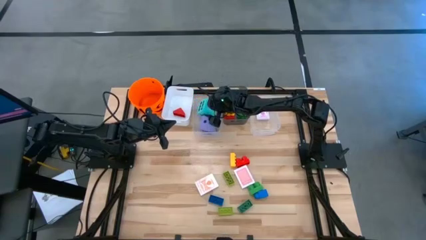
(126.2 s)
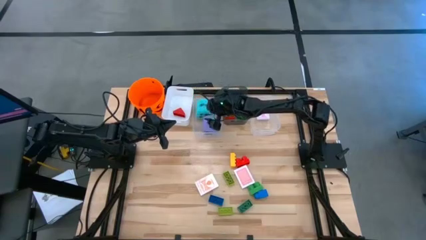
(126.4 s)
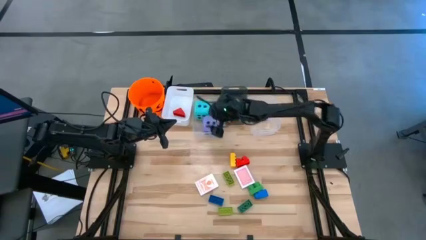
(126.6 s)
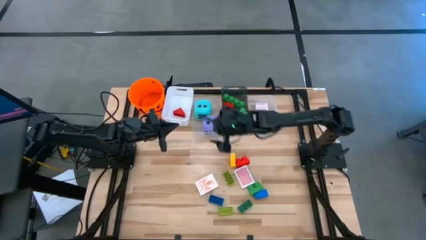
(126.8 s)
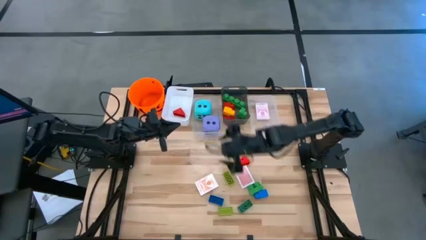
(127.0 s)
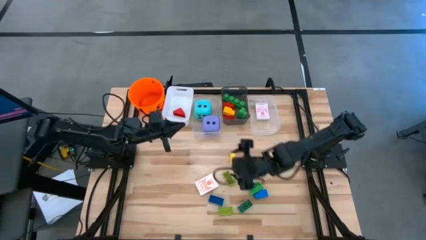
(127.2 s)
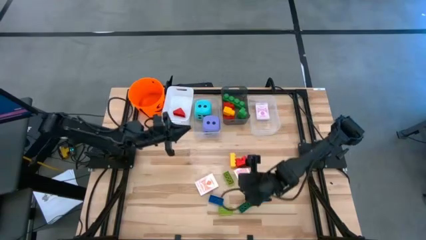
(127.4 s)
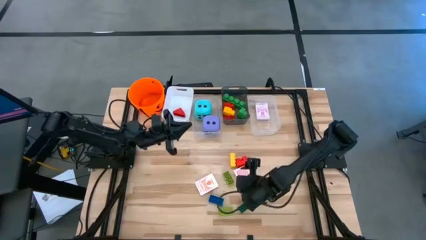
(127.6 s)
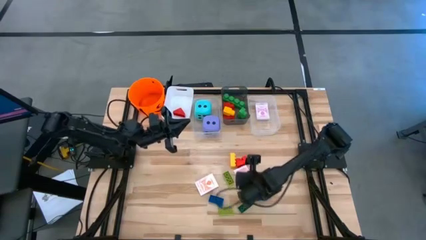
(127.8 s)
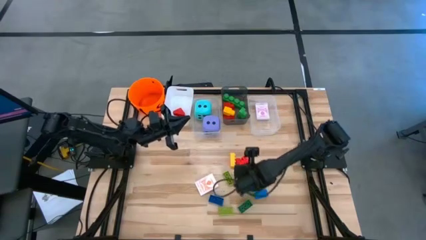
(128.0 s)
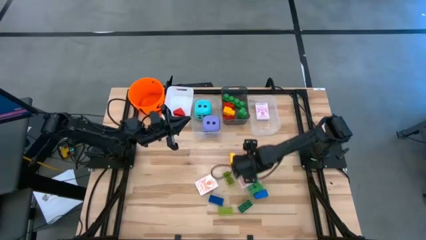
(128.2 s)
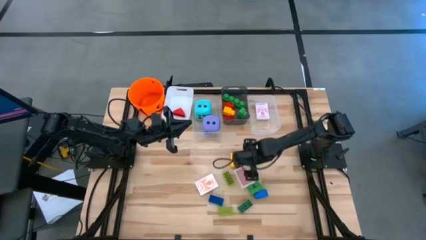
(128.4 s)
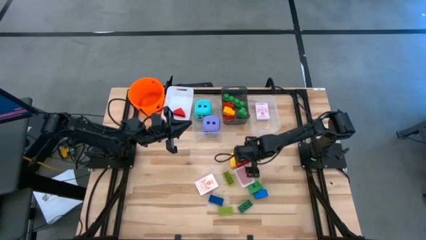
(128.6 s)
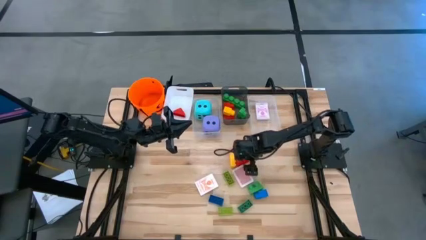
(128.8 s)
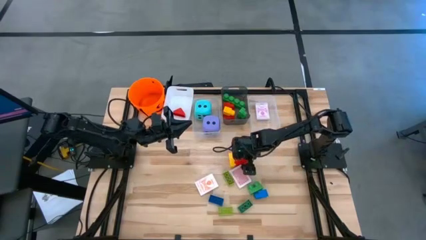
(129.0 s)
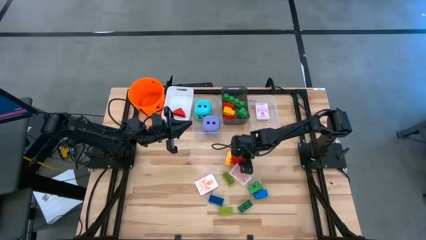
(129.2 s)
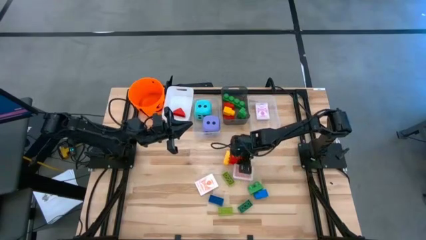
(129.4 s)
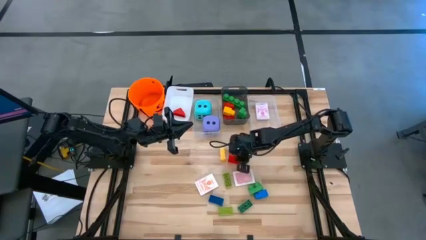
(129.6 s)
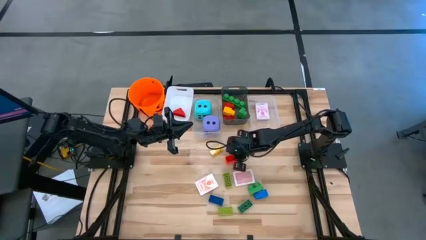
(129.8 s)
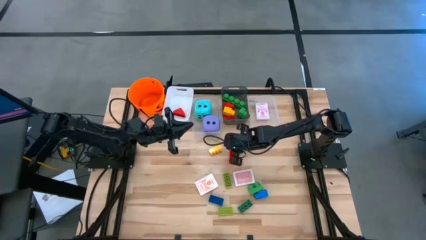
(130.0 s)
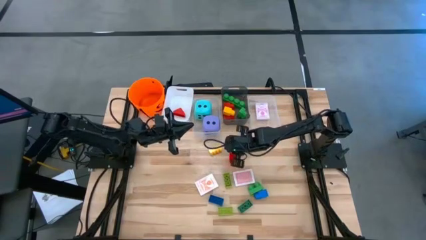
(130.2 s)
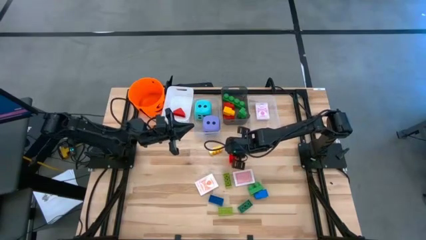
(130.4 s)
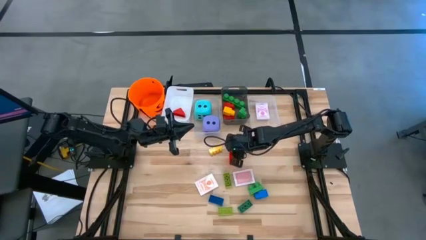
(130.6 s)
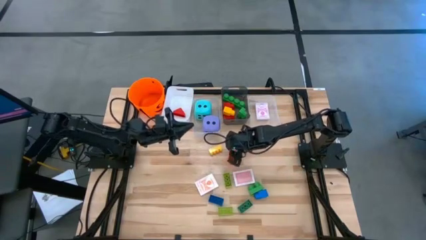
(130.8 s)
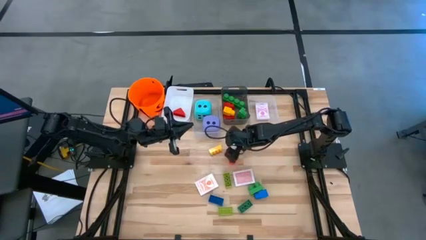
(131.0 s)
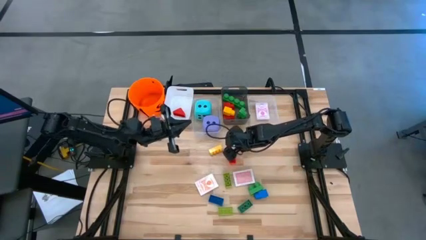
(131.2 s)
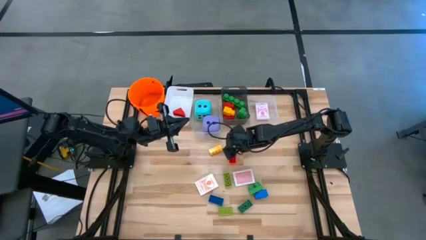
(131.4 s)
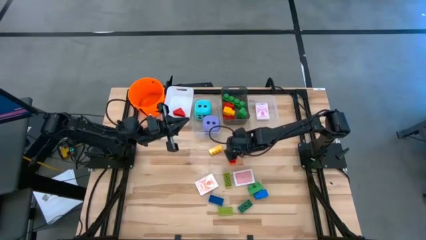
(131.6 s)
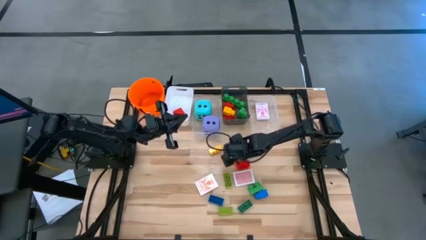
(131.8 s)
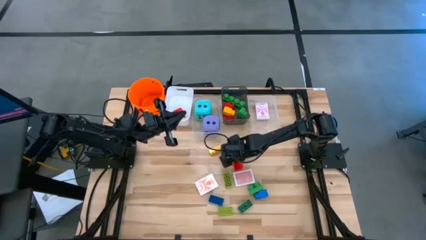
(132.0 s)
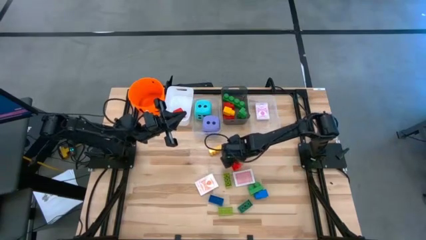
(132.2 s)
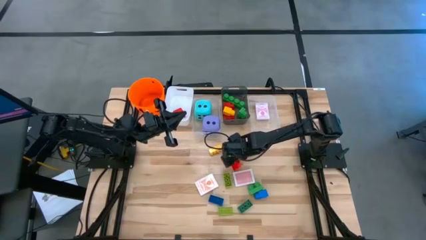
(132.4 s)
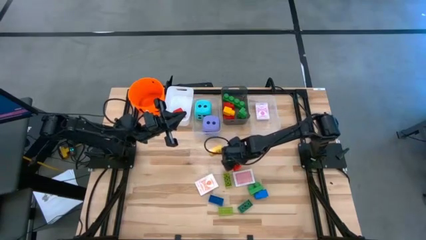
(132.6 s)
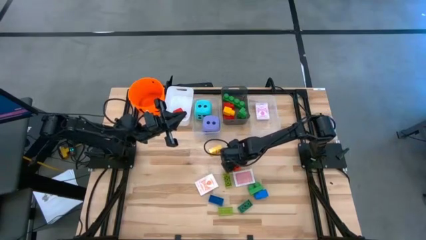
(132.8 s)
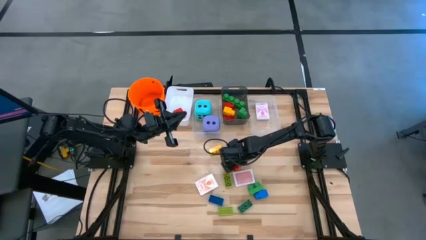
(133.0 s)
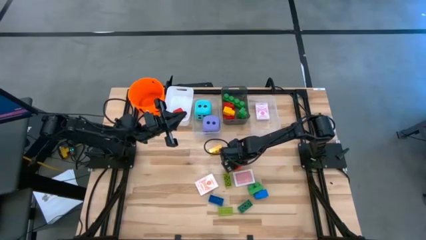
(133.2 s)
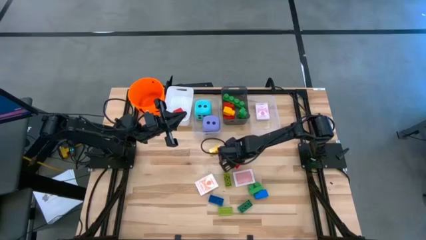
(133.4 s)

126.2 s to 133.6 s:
Task: Pick & Place Toys
Put the large red game piece into the black bin

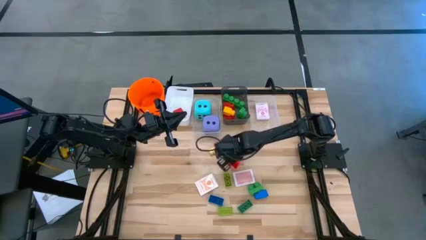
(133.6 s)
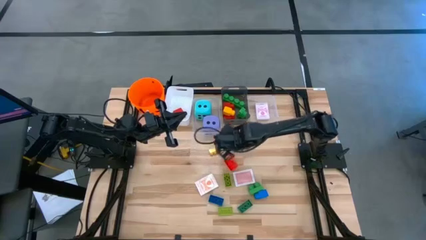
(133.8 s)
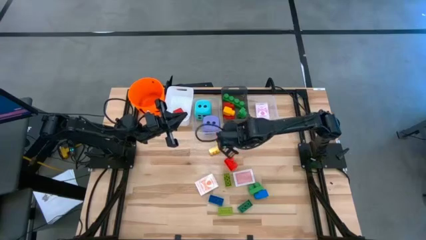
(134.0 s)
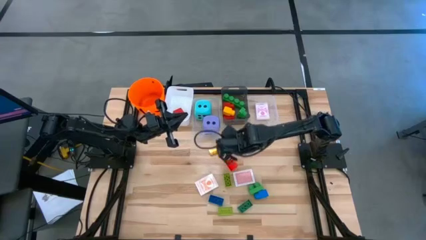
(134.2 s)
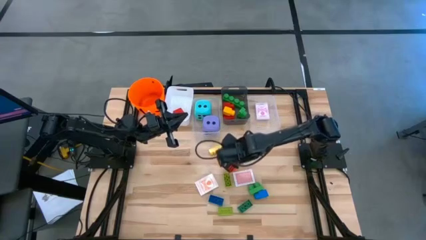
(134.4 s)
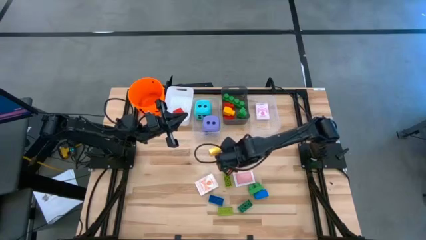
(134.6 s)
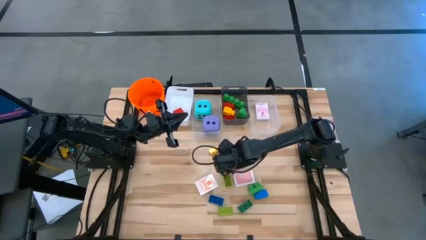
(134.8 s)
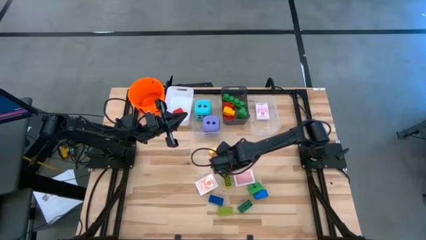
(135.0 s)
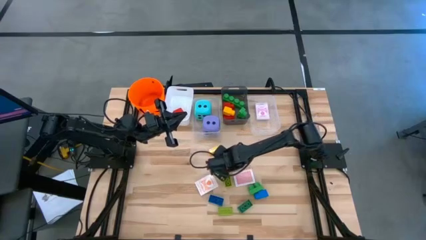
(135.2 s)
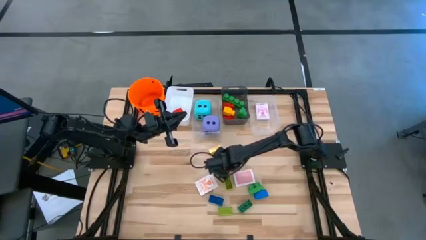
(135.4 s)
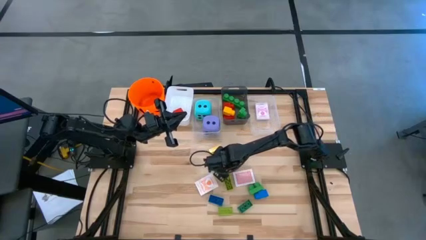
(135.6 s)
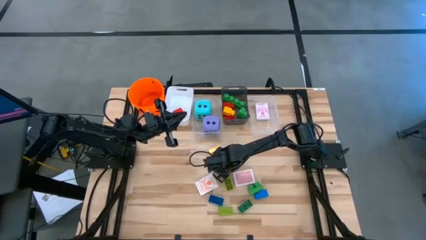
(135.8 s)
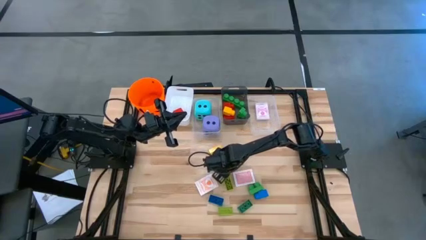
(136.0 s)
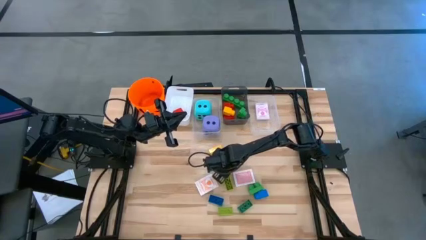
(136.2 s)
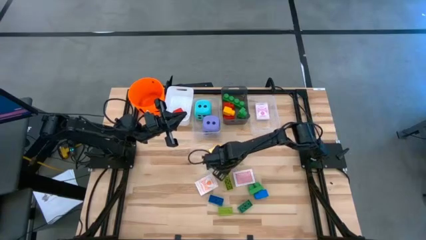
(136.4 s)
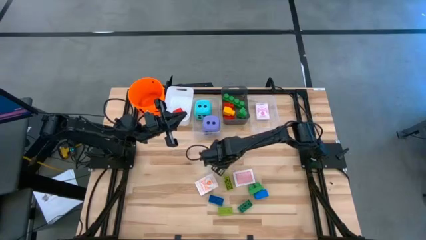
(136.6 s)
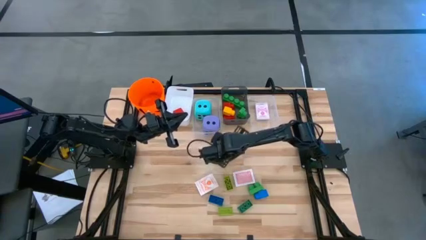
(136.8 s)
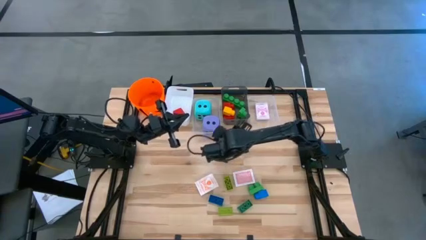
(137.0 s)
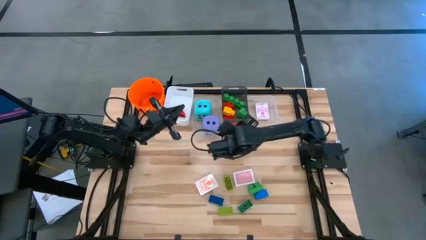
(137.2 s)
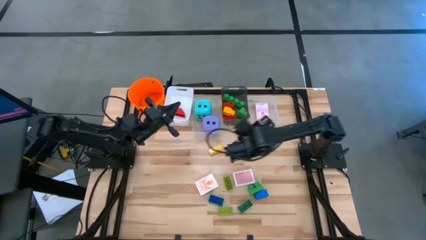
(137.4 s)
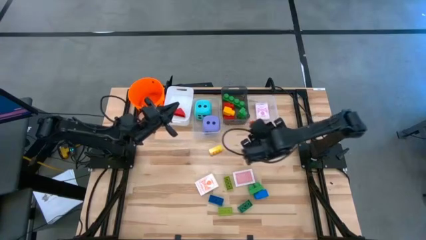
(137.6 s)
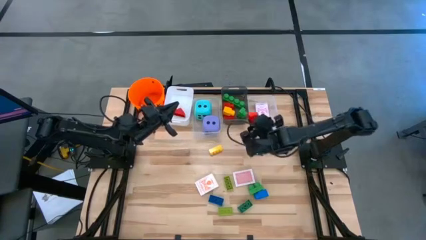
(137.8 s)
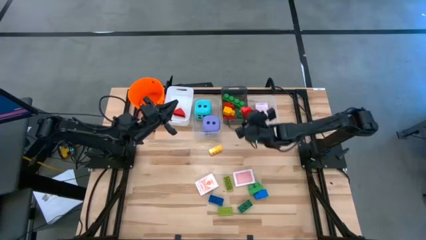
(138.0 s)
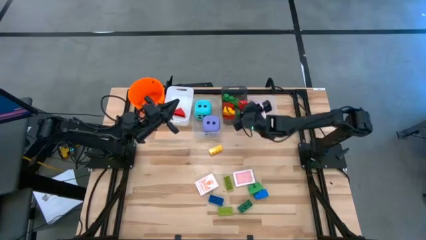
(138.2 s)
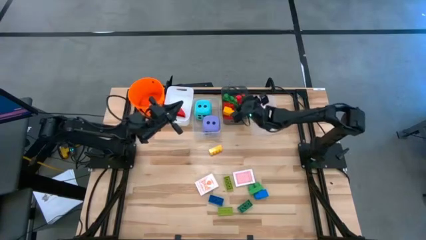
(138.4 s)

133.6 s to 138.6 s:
Put the large red game piece into the black bin

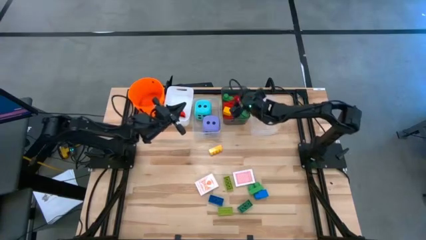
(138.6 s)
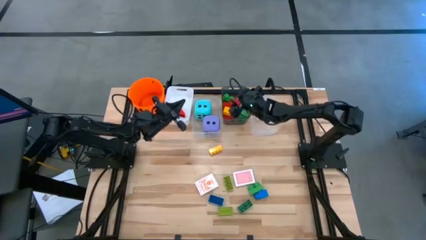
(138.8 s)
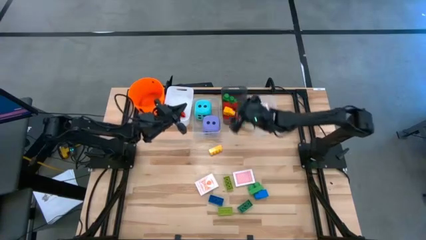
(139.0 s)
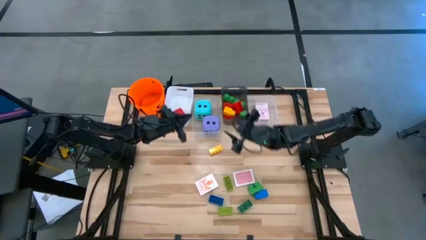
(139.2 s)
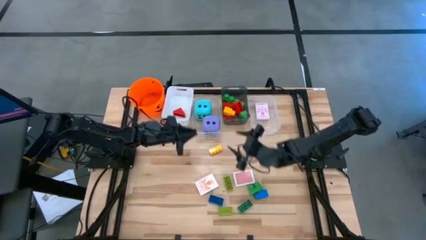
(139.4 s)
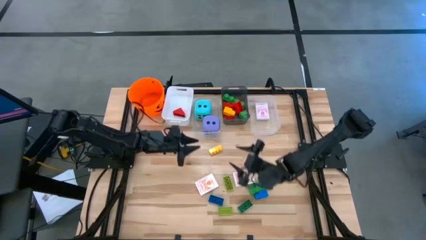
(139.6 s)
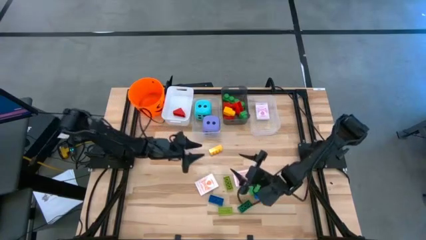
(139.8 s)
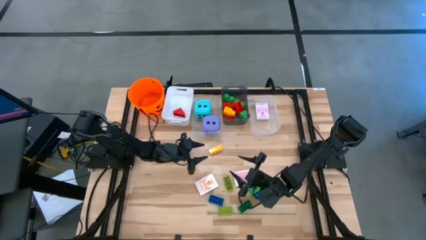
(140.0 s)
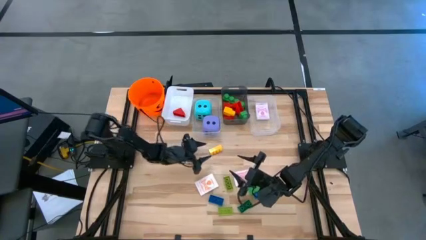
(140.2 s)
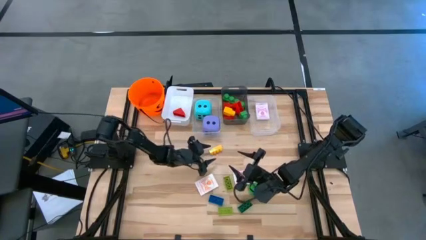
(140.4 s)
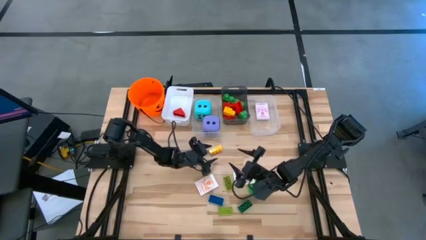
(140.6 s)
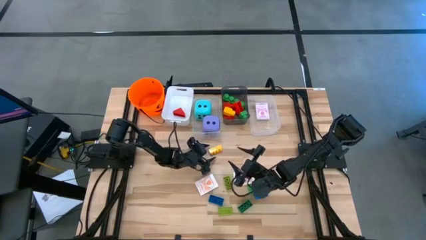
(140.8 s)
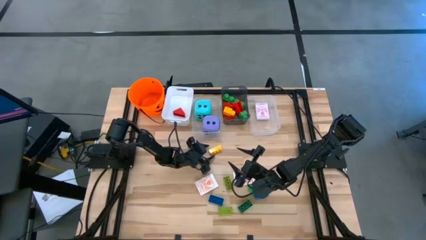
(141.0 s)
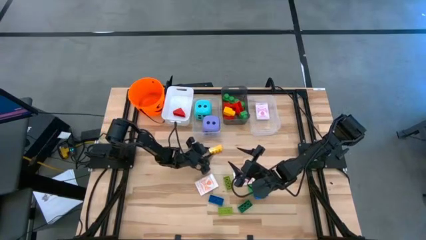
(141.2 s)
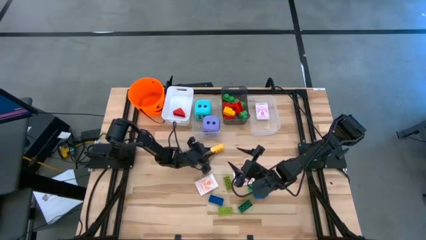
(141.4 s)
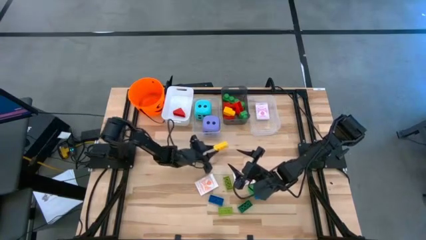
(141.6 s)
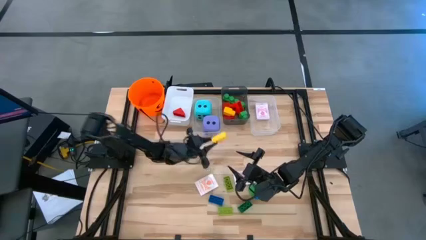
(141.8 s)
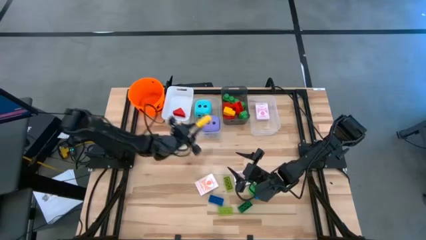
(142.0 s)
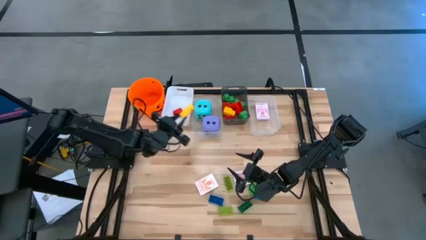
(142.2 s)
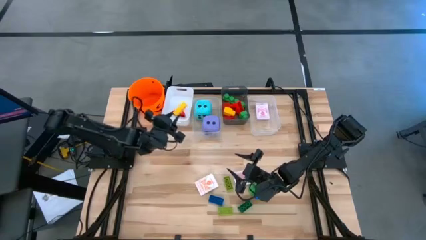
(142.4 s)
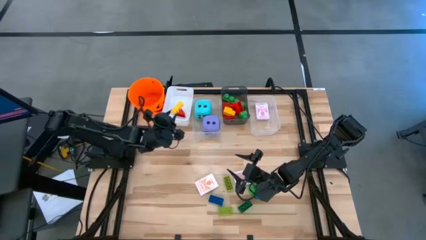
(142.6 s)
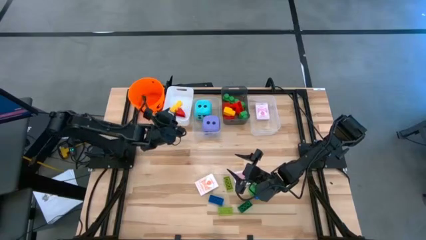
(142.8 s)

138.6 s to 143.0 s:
Put the small yellow game piece into the white bin
